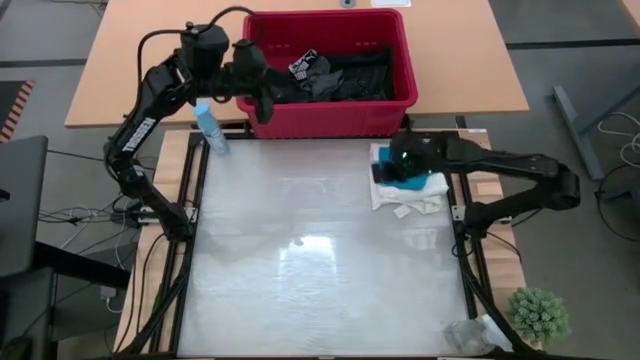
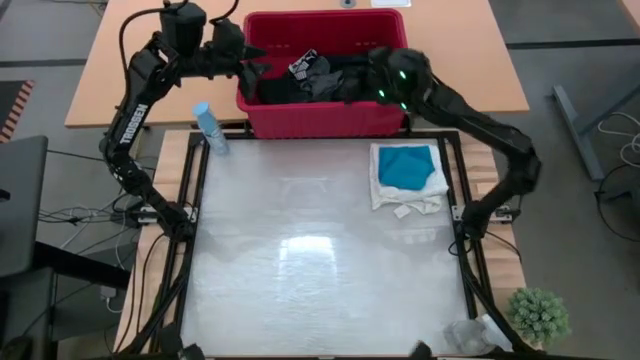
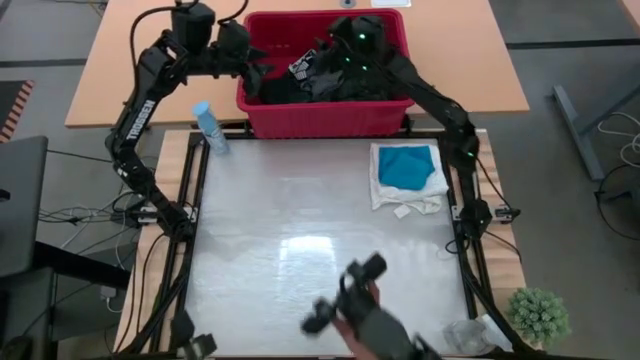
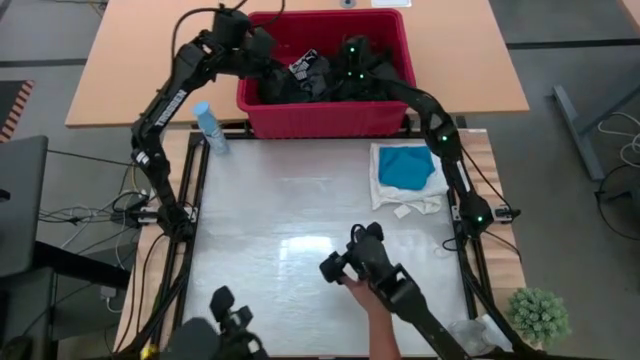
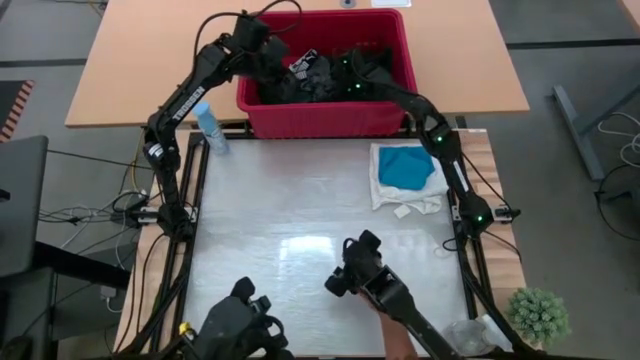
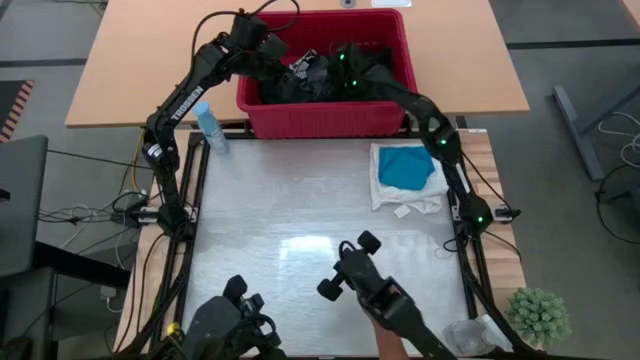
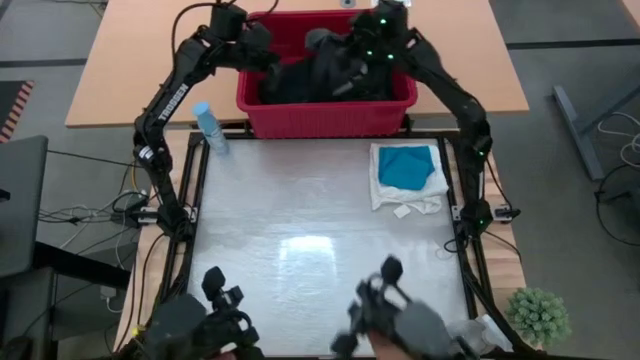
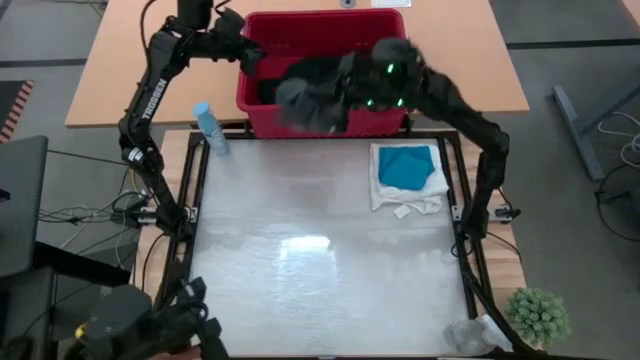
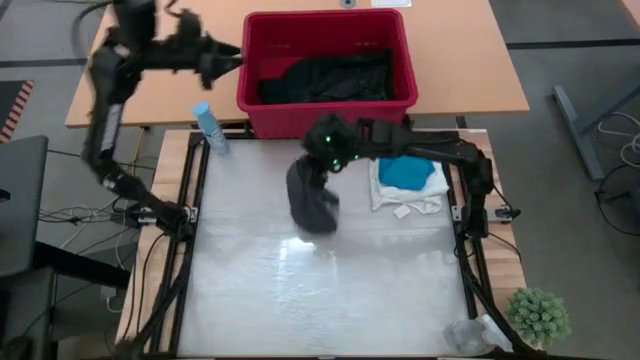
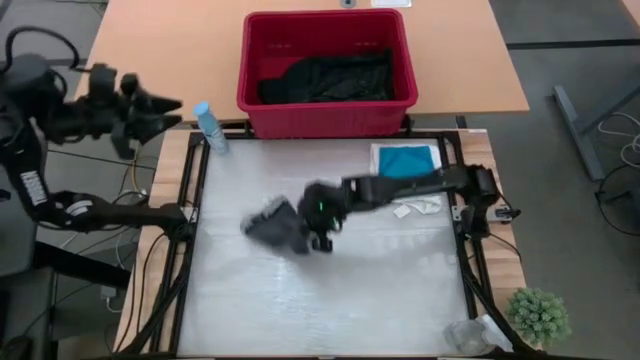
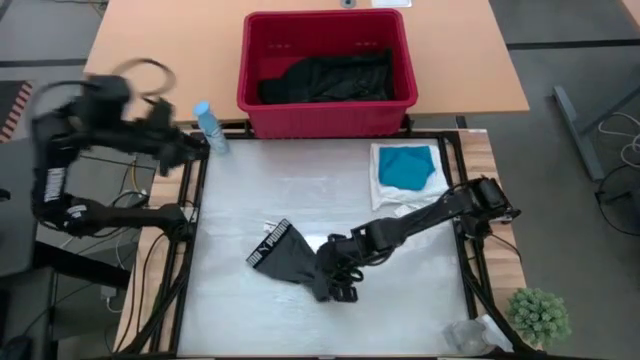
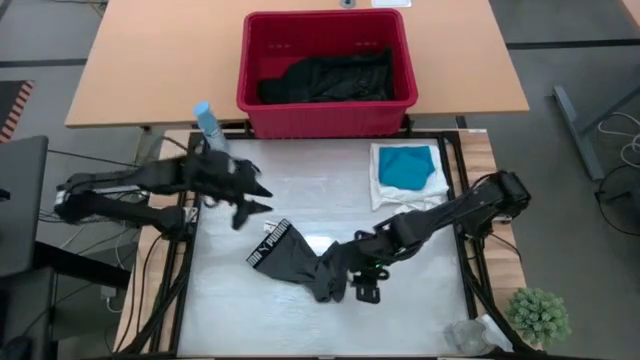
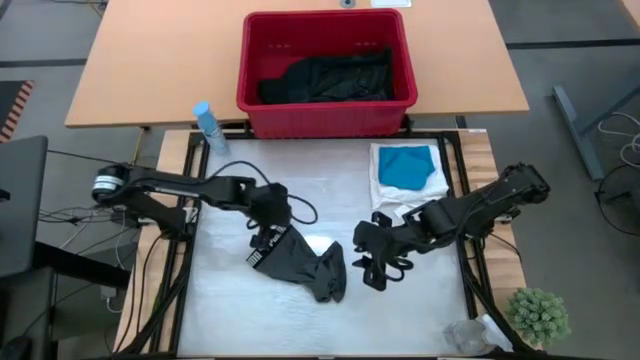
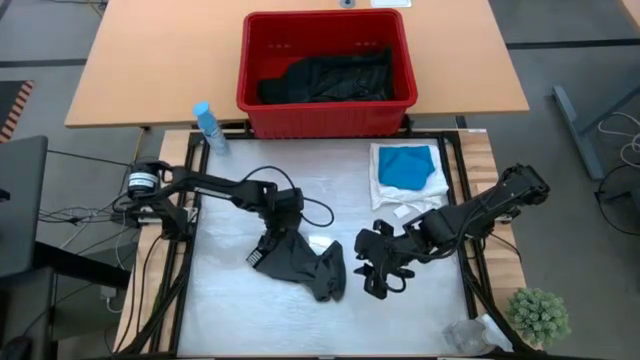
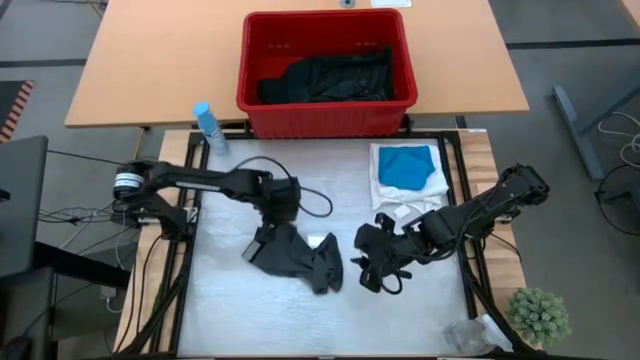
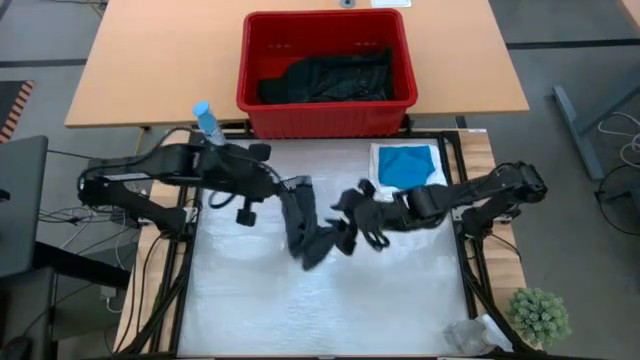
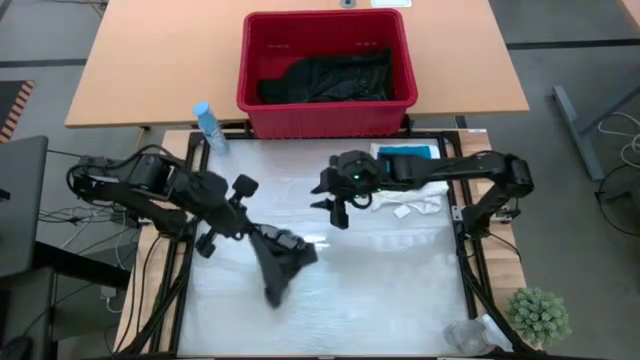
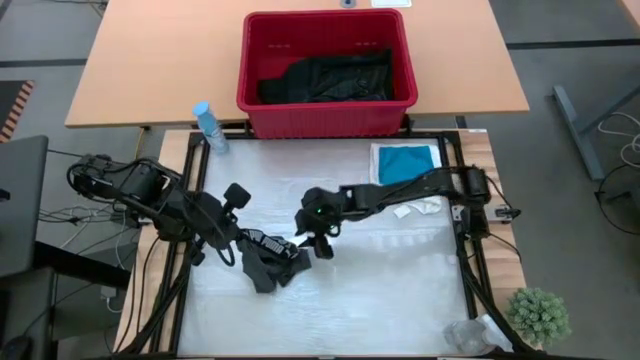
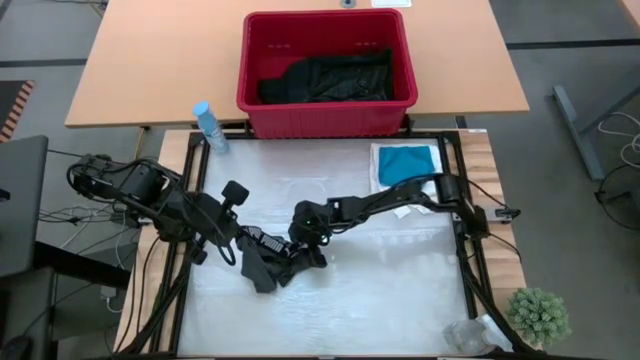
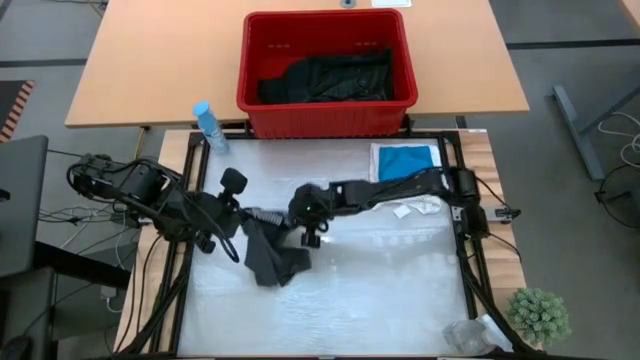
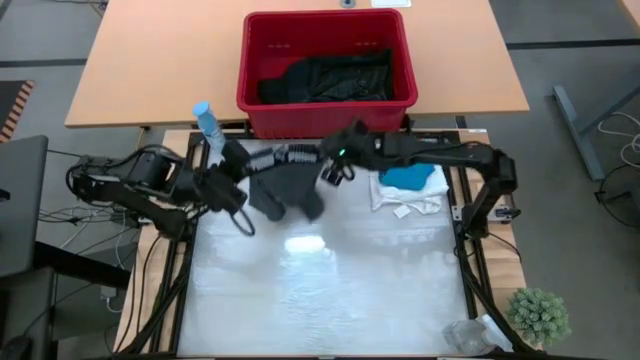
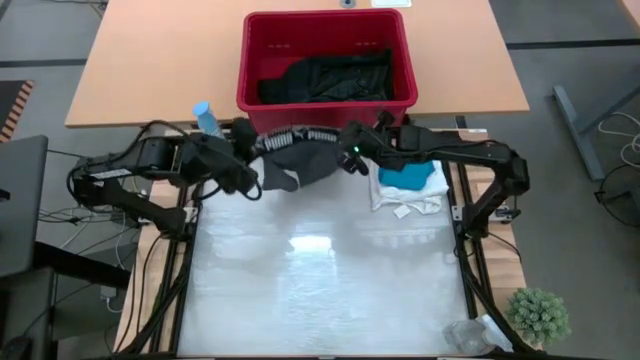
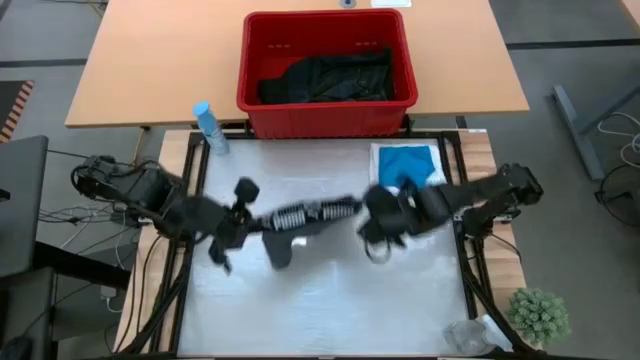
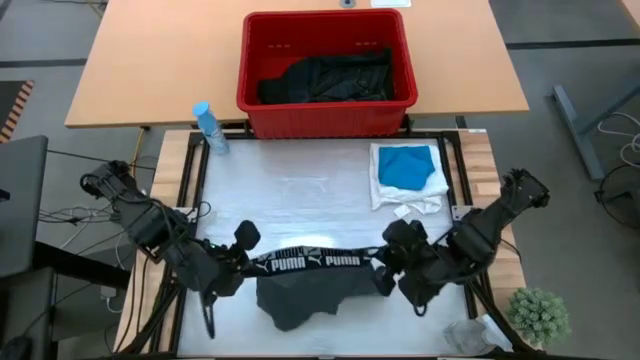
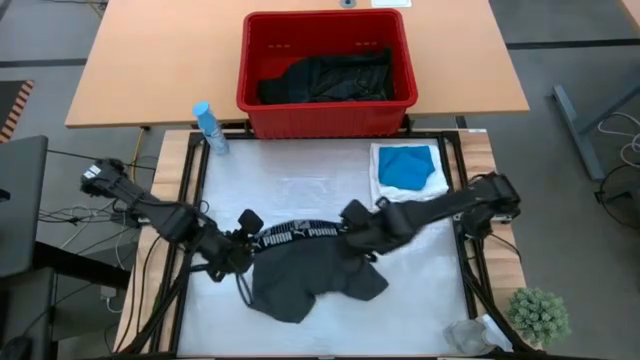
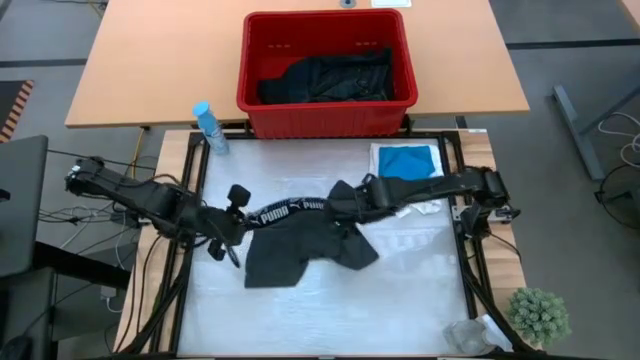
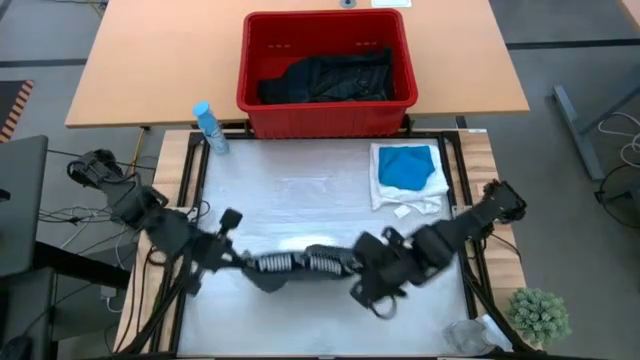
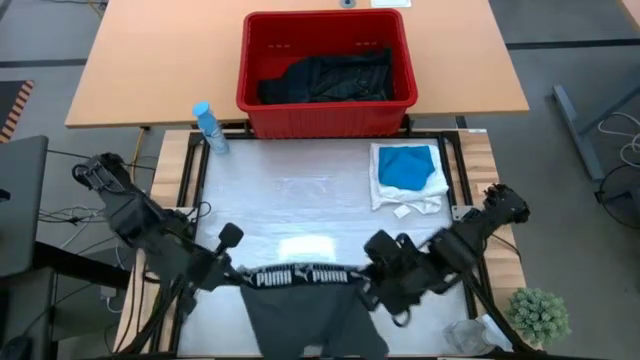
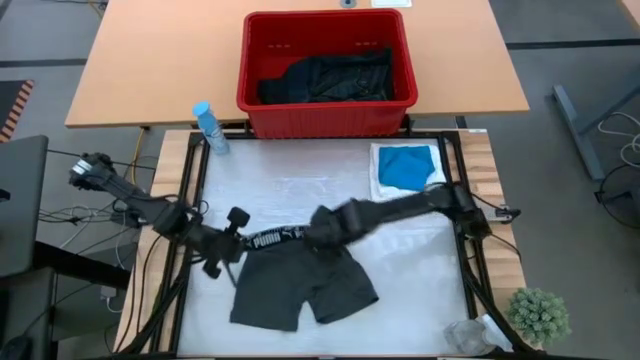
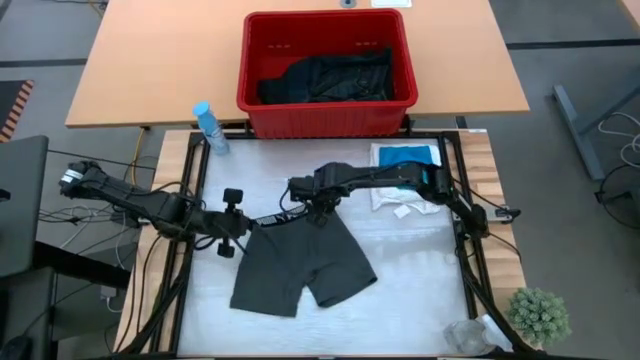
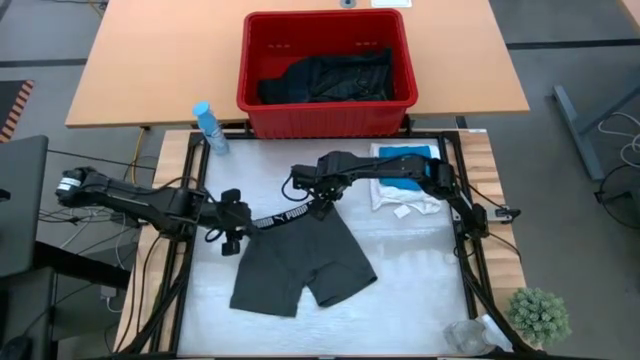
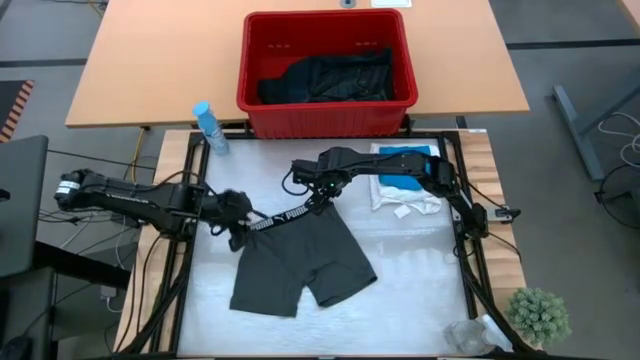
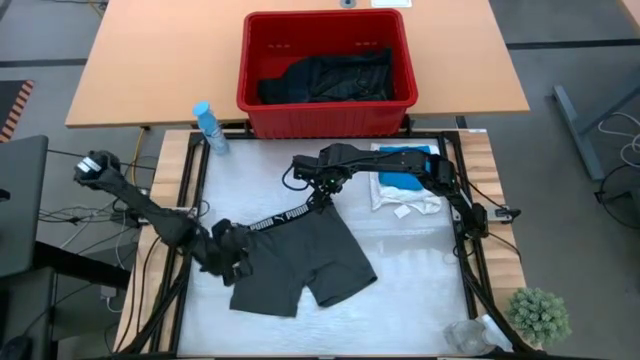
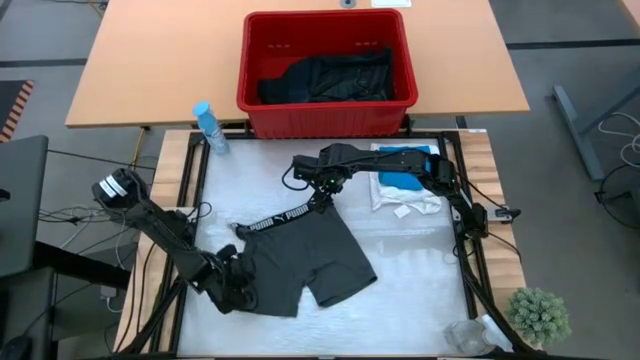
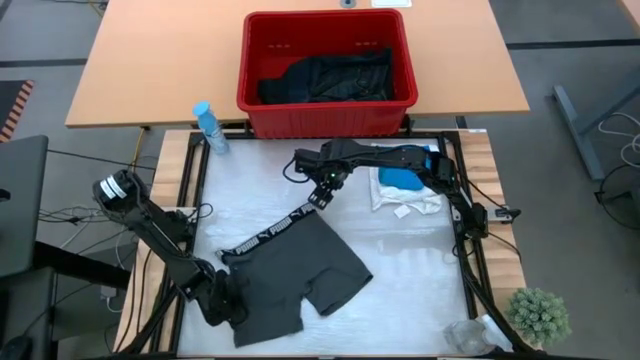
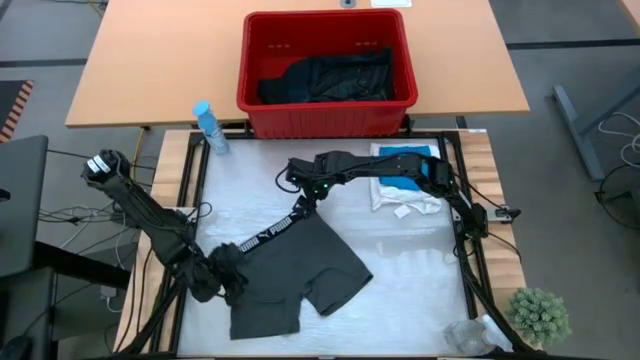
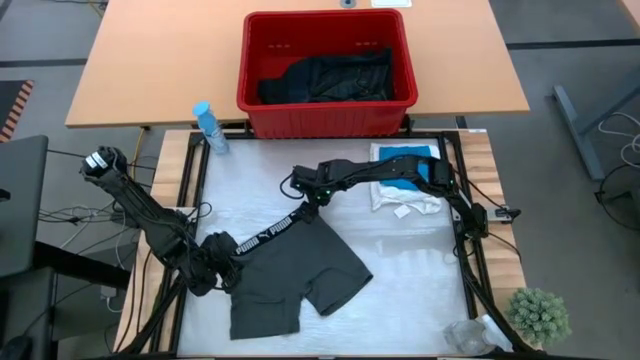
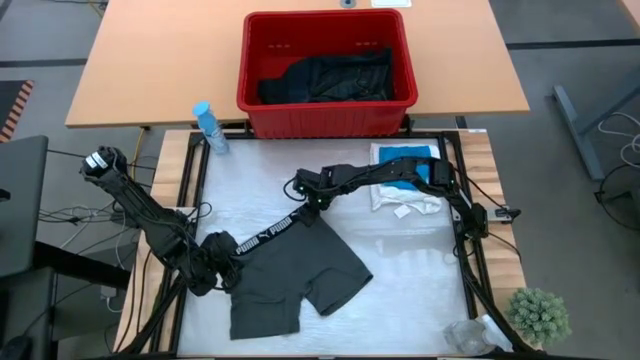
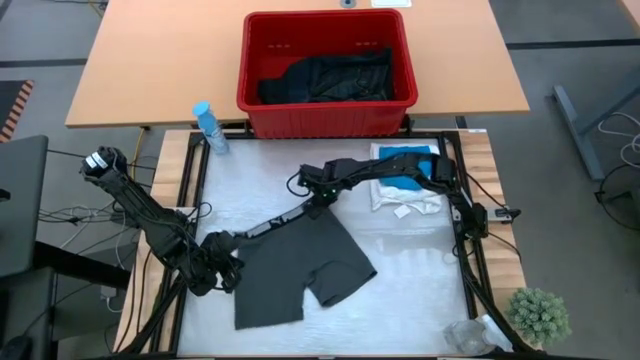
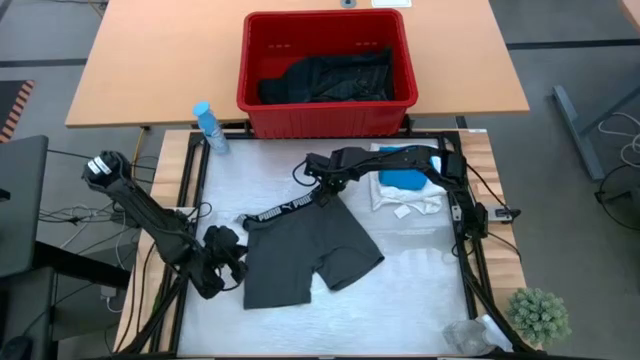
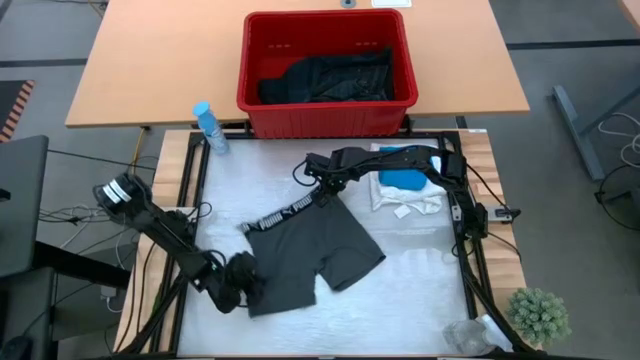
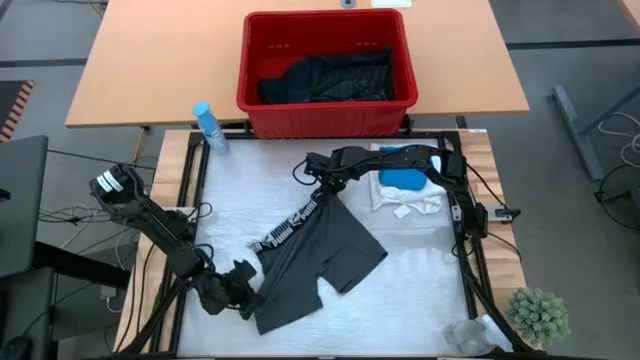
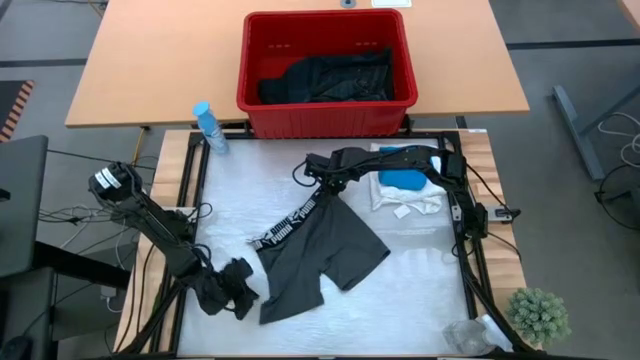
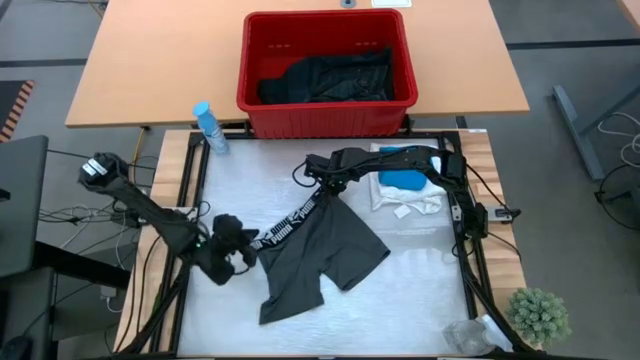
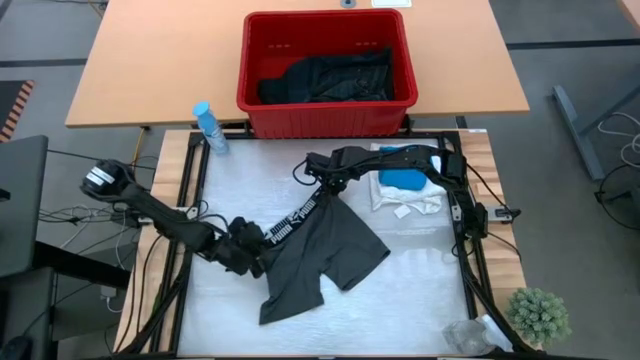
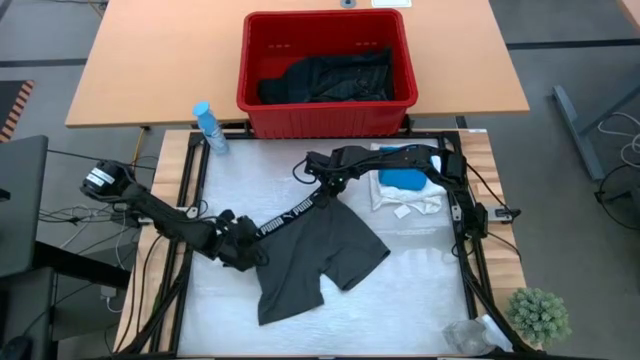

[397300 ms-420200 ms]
Task: Fold laundry
Fold the gray boxers
